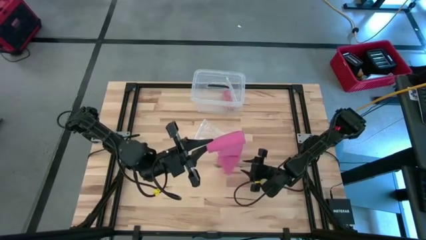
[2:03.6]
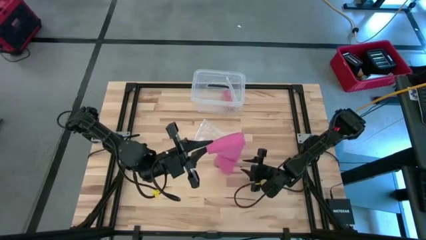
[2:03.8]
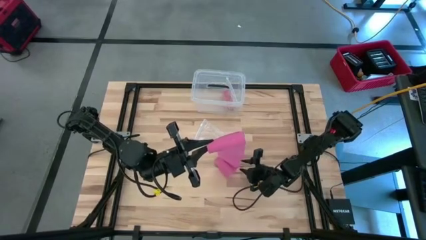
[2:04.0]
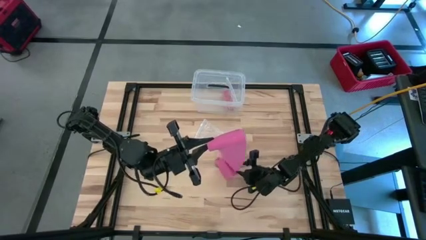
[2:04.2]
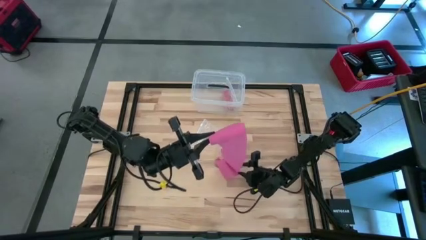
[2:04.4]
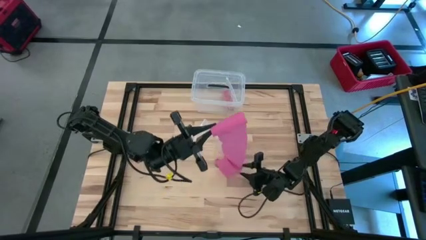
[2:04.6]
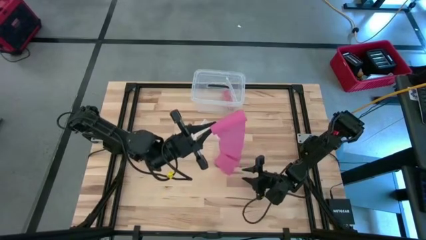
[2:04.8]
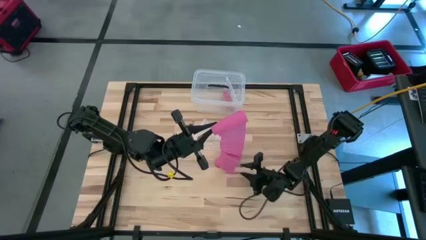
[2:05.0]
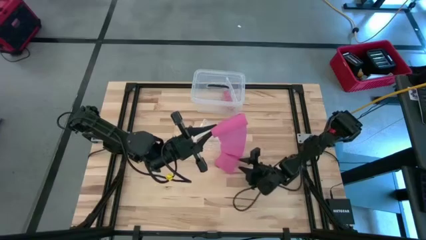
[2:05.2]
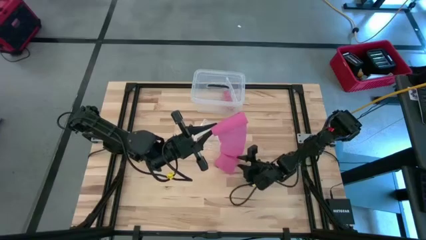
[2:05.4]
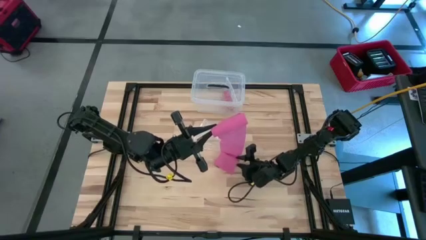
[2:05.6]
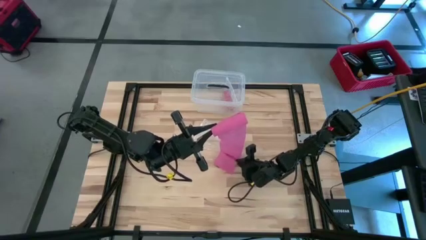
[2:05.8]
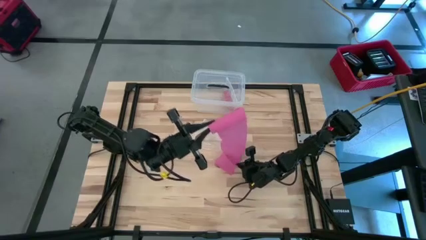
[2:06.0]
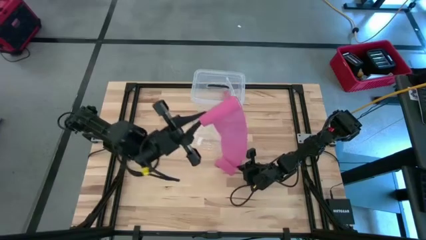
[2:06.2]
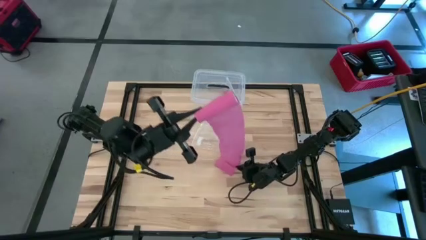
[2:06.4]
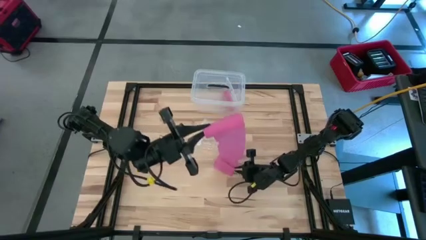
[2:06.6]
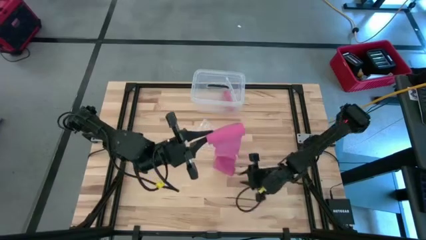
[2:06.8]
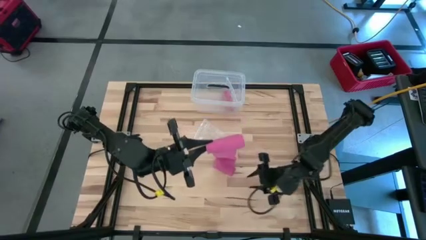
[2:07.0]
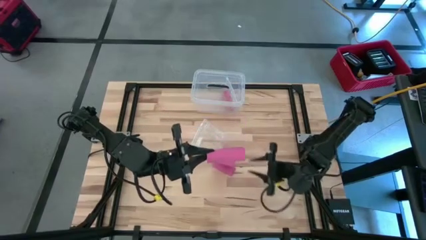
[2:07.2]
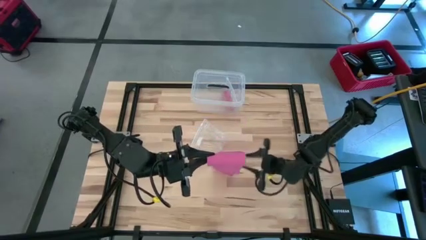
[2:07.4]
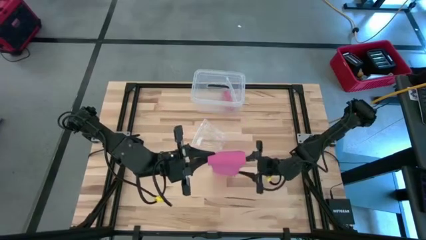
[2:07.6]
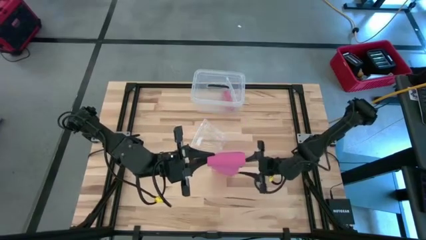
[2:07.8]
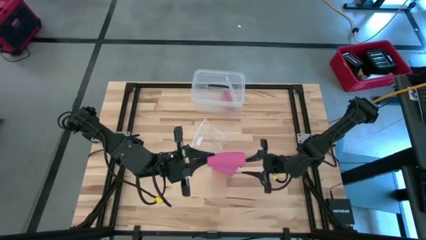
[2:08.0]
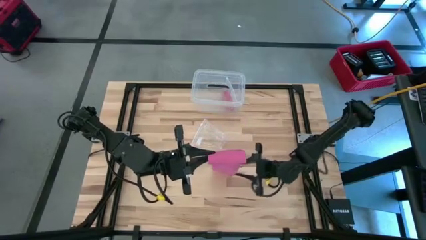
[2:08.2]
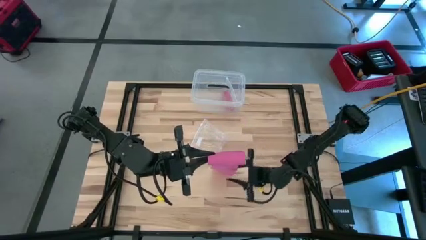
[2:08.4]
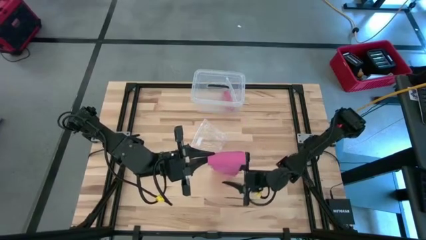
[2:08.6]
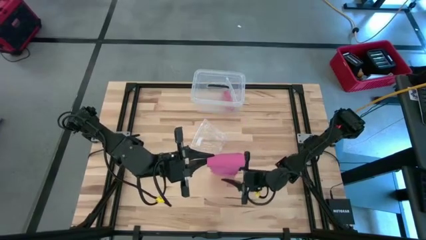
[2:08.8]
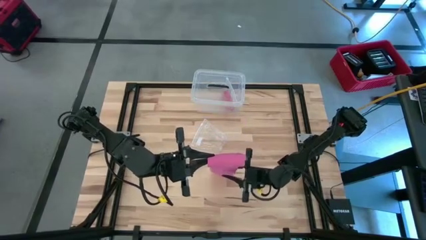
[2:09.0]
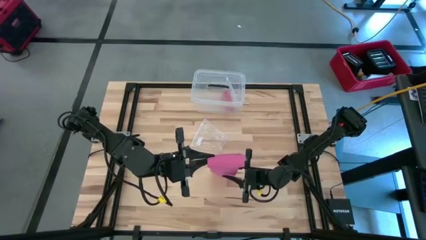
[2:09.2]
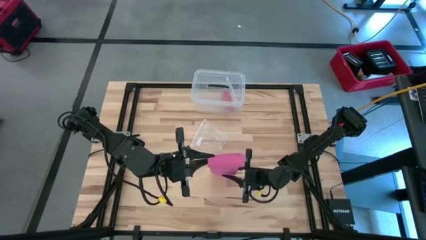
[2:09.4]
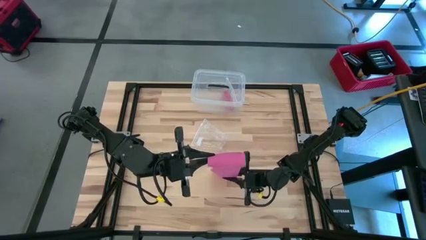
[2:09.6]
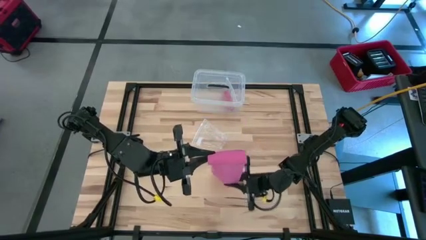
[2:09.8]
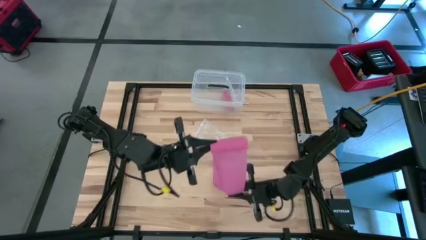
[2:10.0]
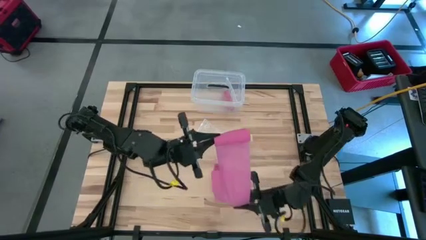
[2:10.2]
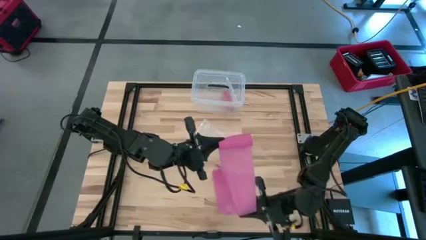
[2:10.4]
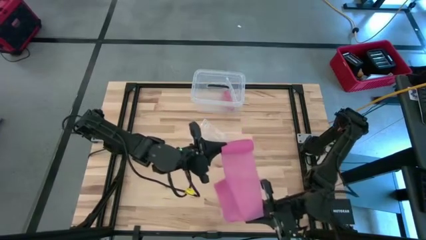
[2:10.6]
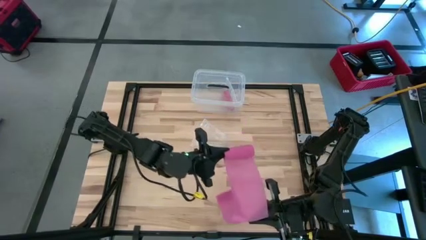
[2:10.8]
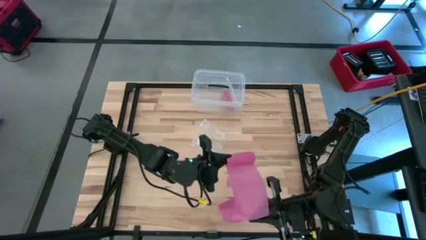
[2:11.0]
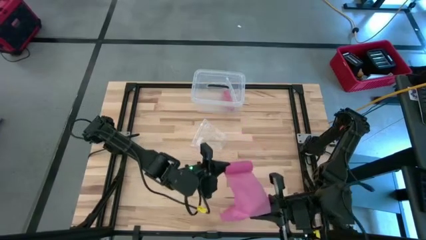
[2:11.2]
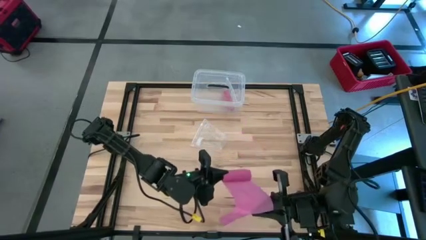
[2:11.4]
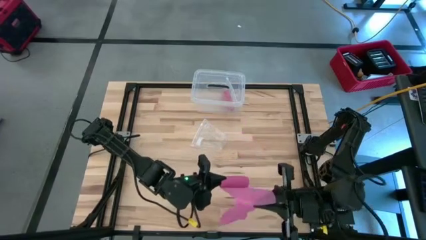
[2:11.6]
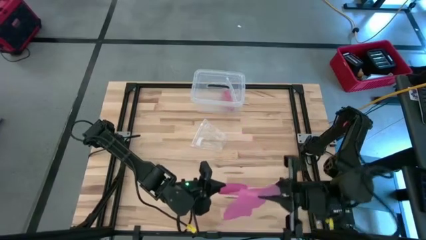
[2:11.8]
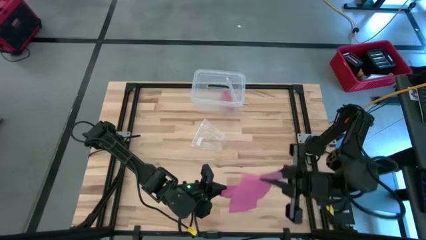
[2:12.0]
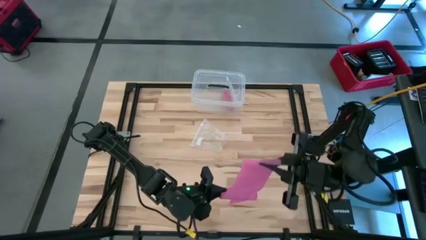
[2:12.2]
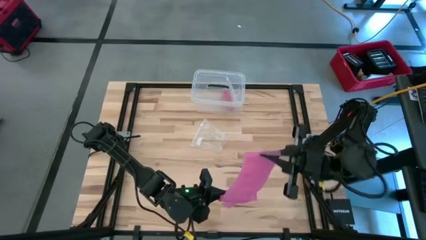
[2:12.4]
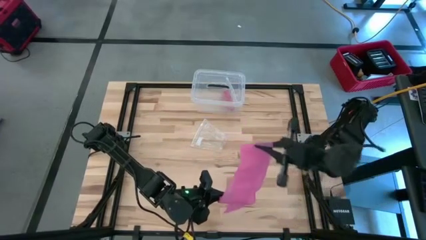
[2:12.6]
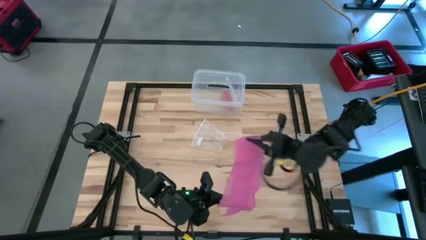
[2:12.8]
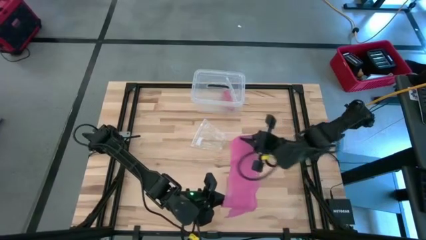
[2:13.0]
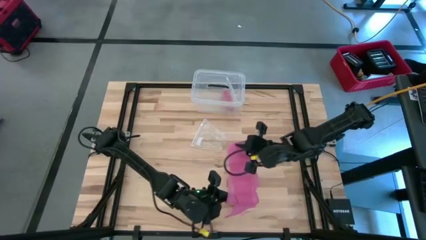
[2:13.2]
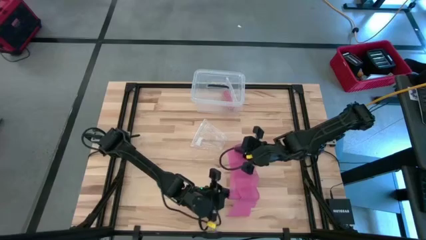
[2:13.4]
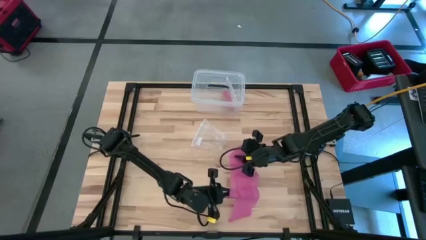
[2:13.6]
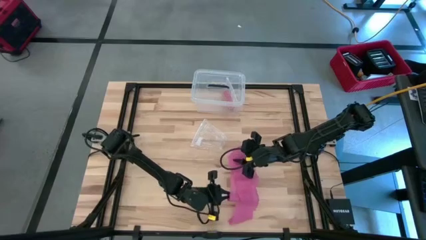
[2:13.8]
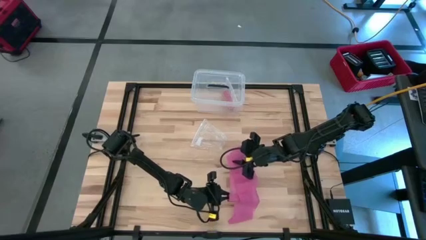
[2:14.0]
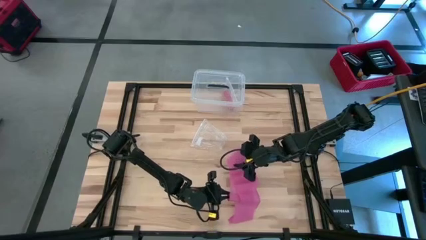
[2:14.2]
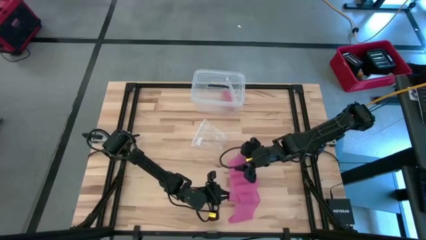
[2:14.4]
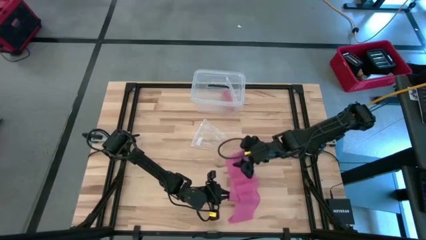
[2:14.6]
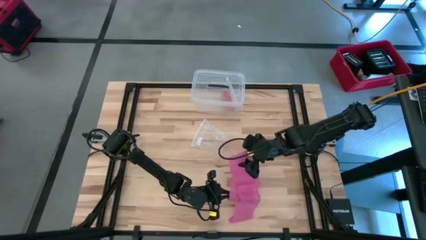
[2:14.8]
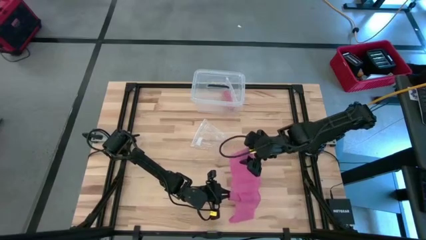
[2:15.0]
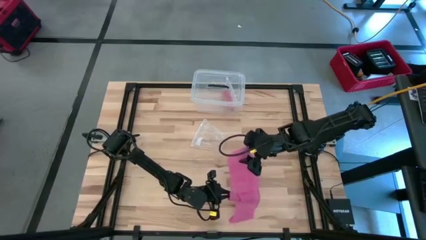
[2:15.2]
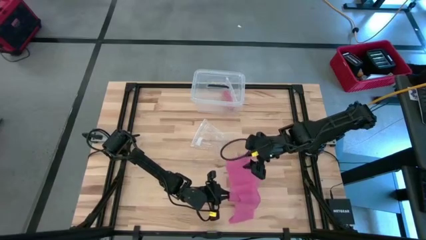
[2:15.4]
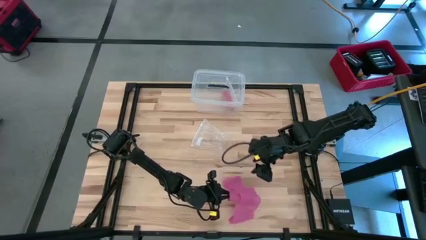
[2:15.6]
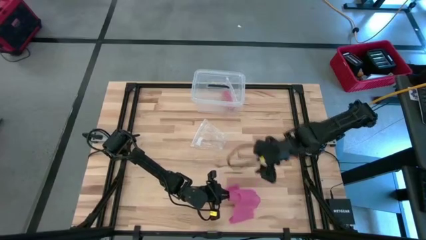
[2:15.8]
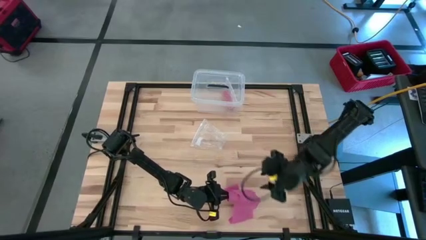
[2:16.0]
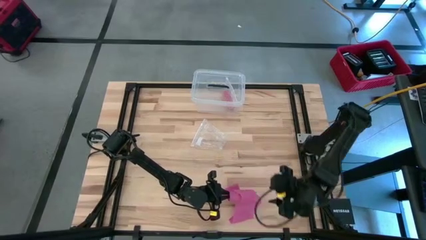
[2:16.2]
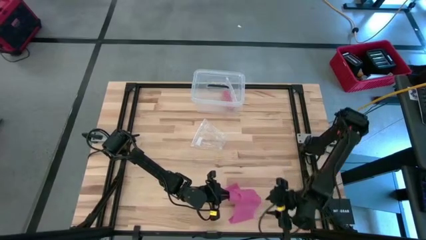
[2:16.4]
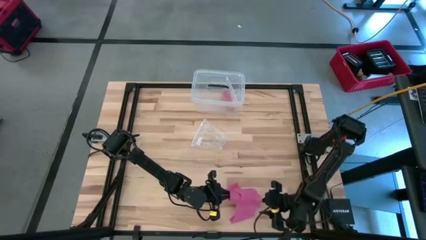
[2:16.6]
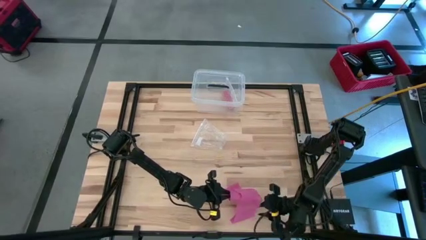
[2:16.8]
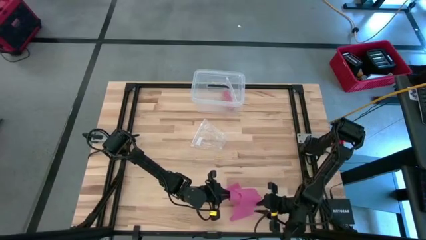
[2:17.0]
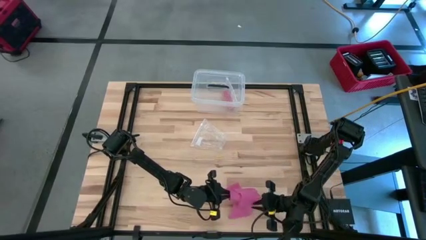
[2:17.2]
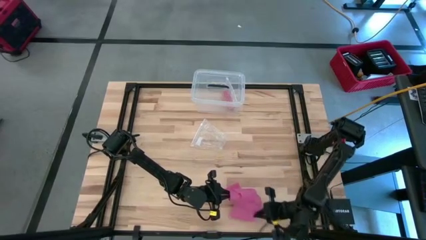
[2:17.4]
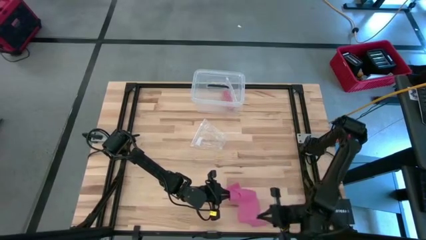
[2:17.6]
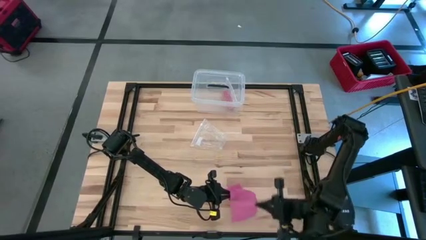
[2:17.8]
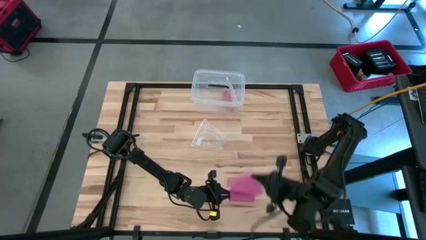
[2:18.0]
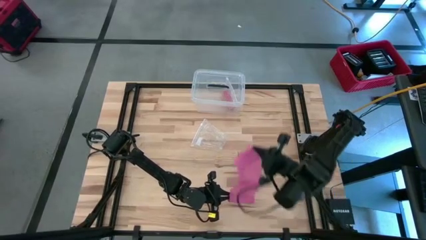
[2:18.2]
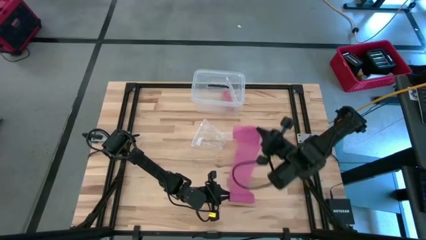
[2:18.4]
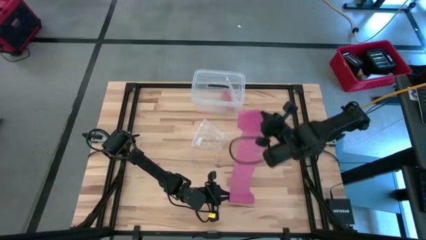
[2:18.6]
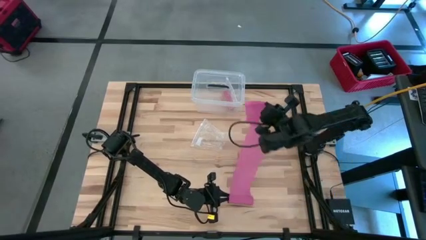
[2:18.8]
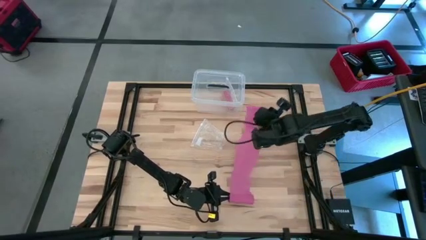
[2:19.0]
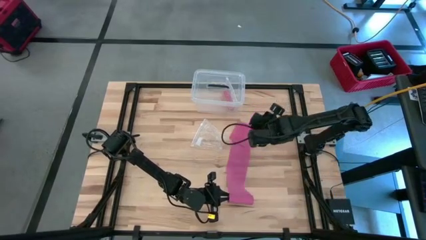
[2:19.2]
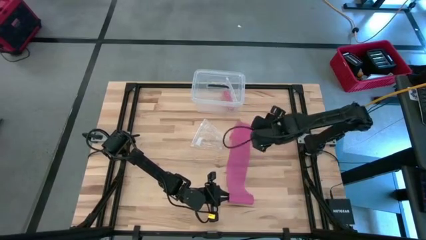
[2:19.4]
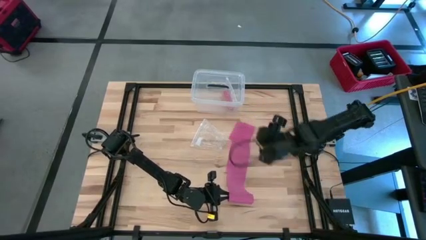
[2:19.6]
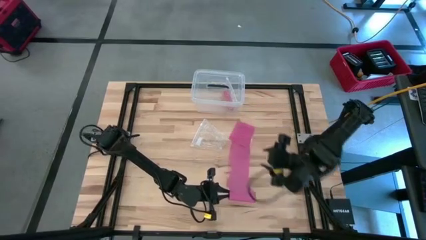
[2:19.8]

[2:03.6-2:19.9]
Task: Roll bandage
Roll the pink bandage
